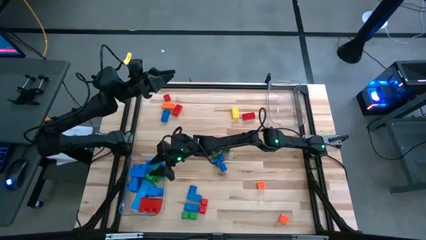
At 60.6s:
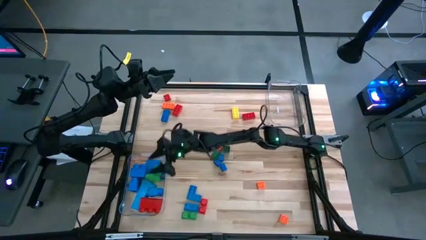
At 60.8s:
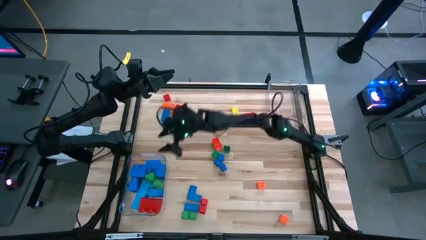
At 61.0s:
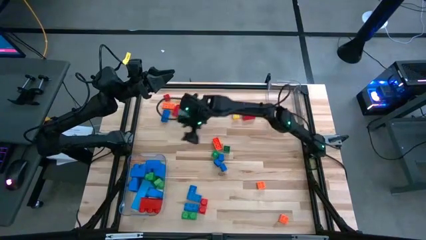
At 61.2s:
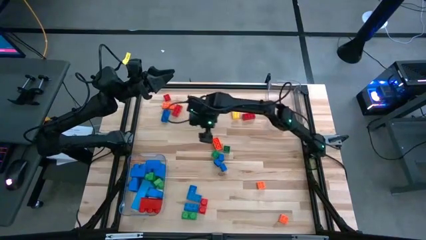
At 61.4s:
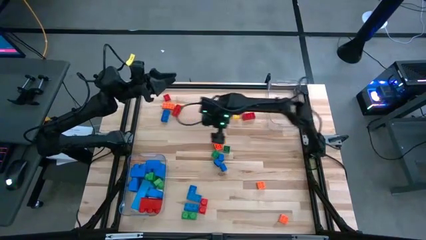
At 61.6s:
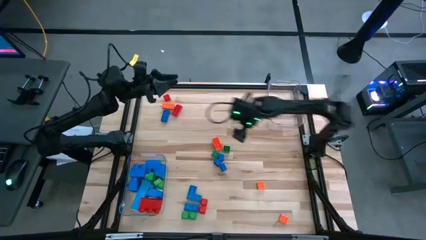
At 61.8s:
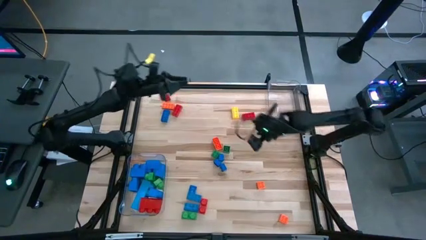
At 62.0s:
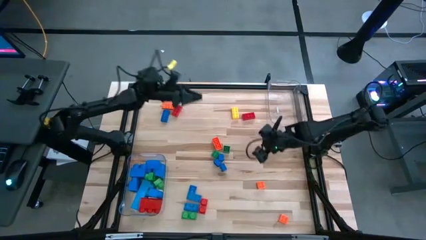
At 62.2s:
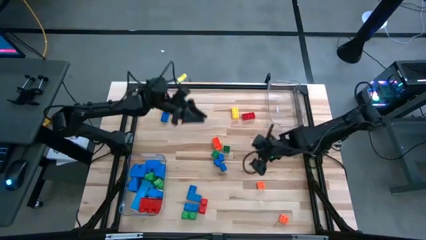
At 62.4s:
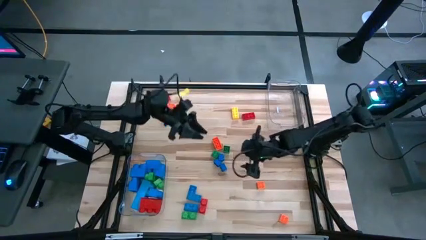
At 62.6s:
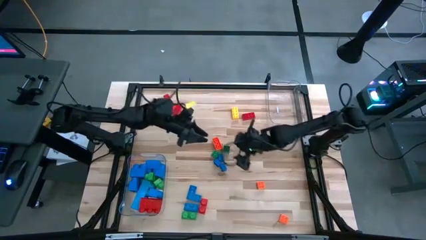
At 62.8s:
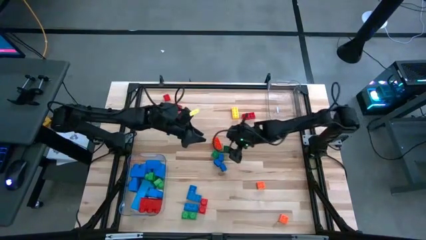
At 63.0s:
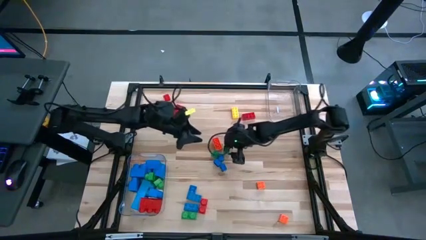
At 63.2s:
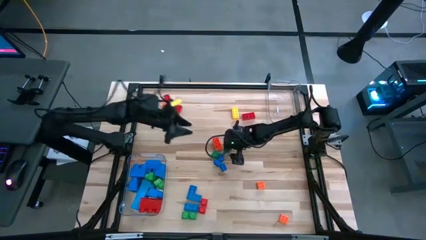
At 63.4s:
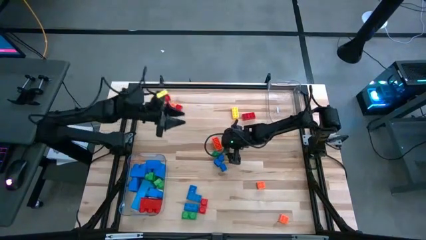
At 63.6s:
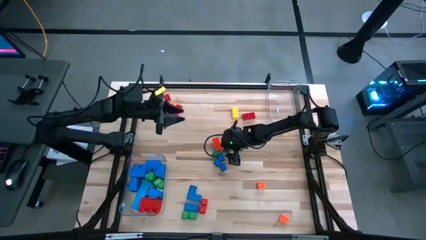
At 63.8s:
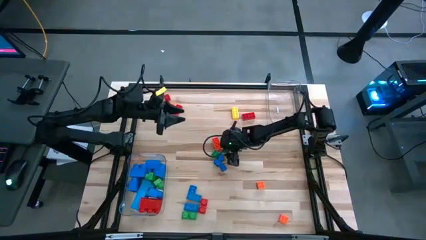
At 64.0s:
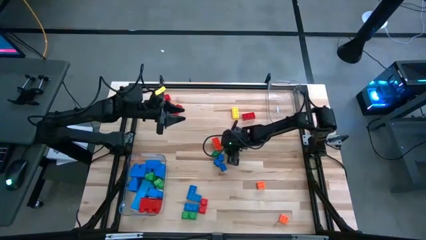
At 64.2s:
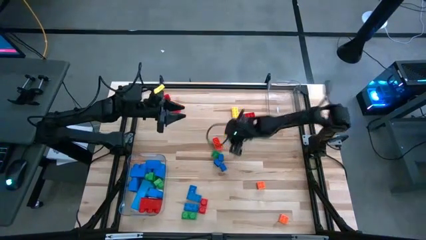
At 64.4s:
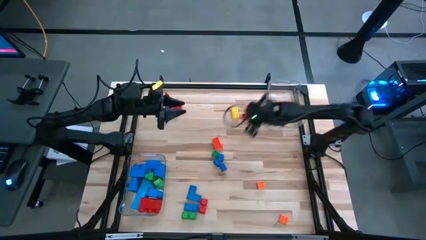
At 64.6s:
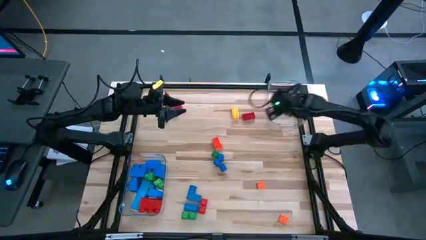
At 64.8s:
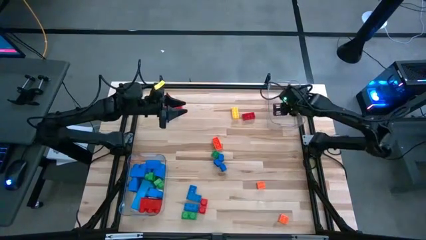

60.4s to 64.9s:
Task: Sort blocks by size
Put the small green game piece into the top transparent bin

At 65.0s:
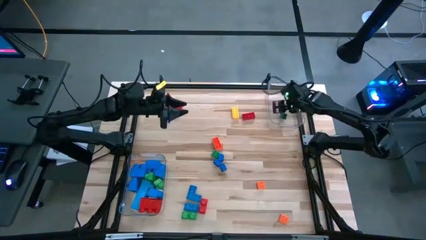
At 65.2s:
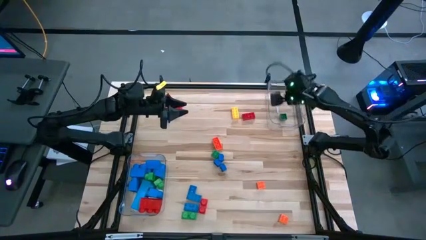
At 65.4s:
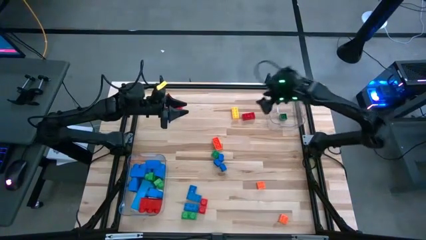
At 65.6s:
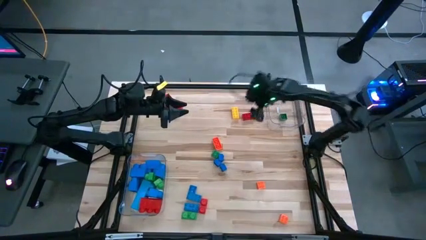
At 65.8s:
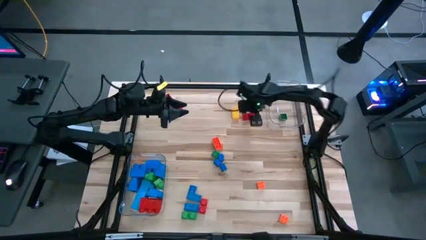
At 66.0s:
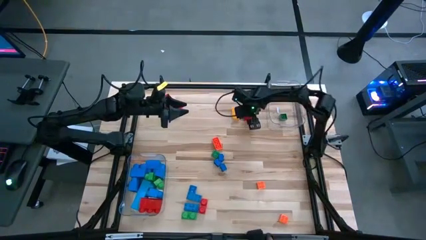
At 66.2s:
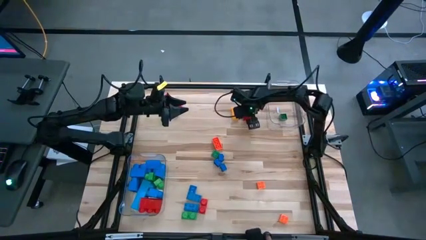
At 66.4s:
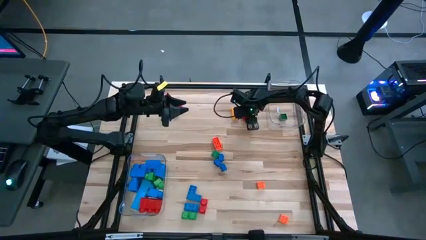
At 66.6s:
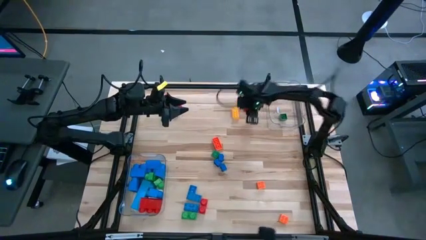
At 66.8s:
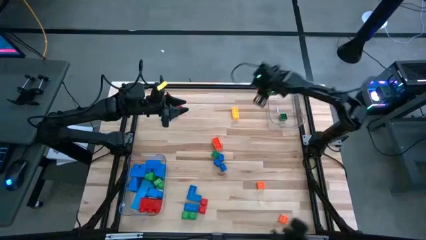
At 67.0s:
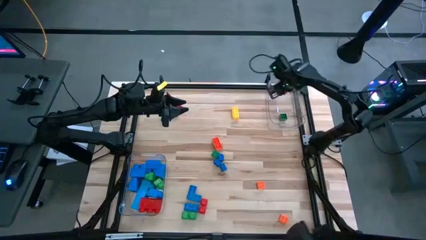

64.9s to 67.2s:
Put the small red game piece into the top transparent bin

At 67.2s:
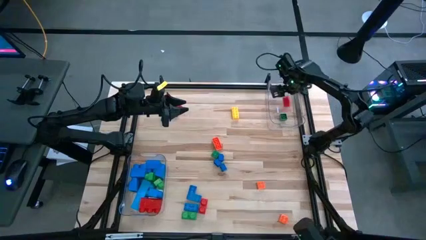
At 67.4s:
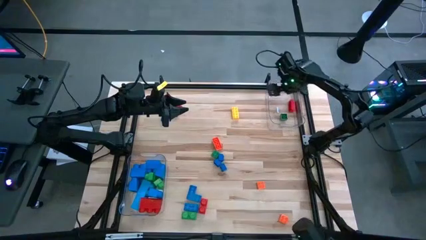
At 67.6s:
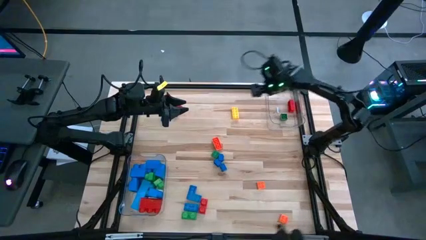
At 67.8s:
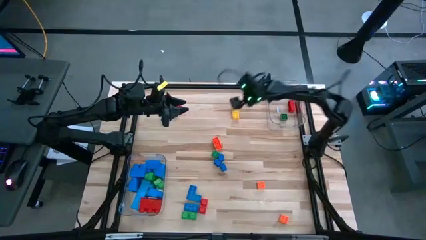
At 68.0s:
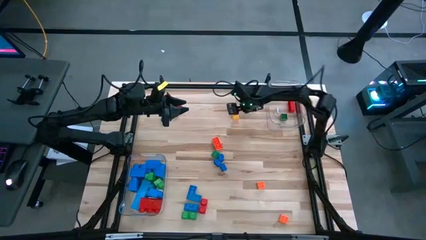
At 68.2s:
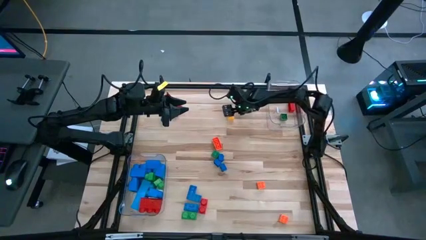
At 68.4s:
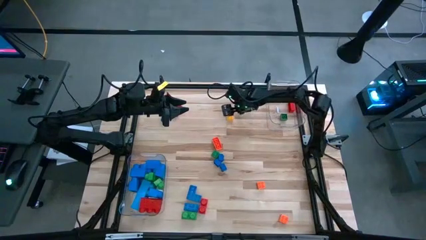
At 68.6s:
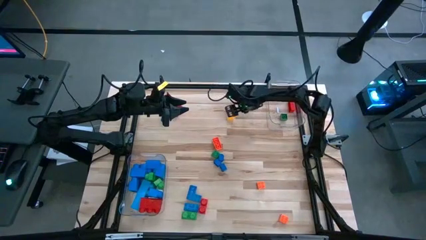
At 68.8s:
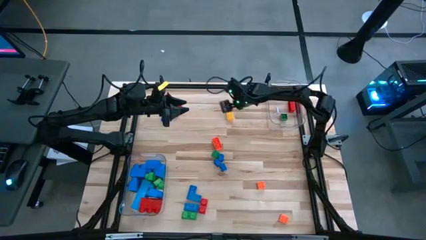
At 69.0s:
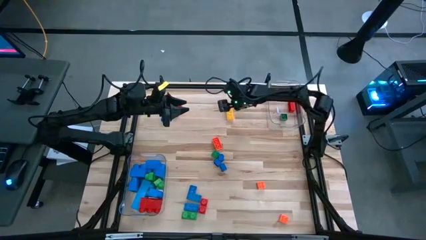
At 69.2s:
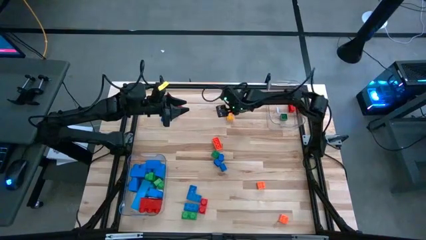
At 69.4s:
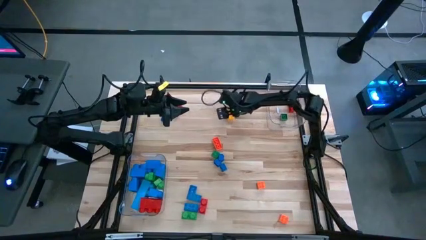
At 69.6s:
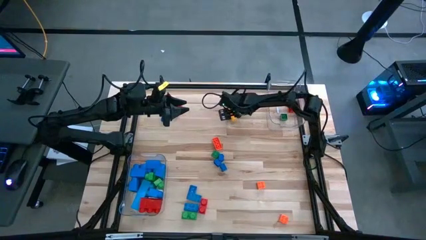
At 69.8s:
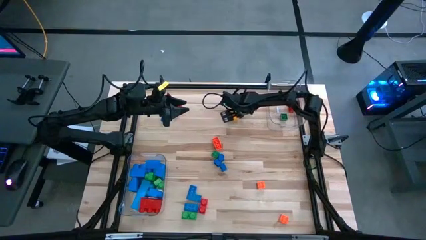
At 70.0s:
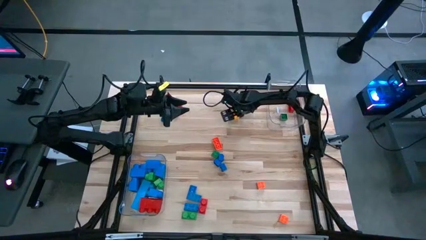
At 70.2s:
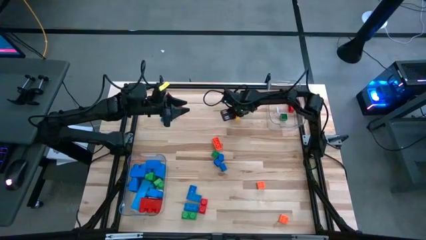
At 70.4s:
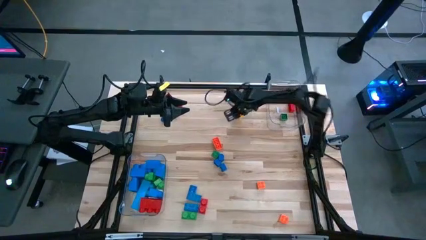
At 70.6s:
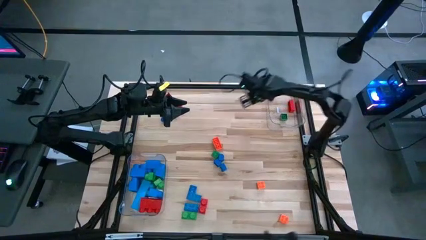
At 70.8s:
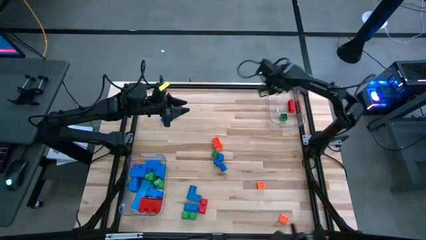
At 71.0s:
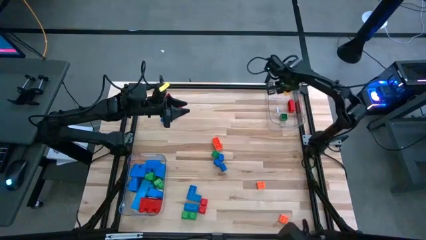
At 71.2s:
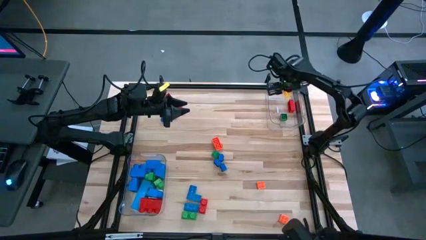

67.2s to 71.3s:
Put the small yellow game piece into the top transparent bin

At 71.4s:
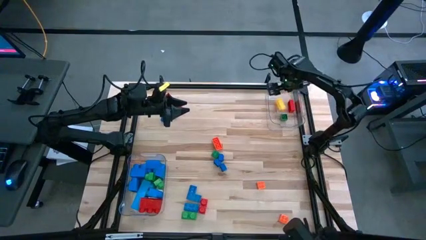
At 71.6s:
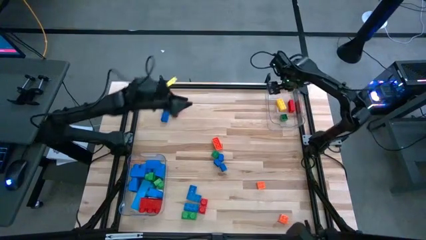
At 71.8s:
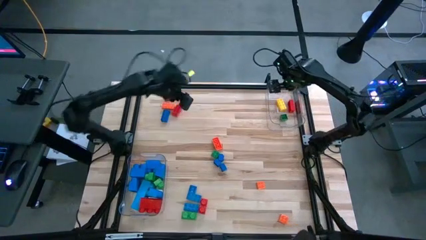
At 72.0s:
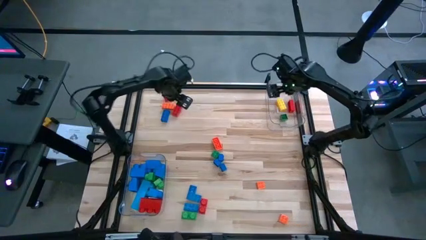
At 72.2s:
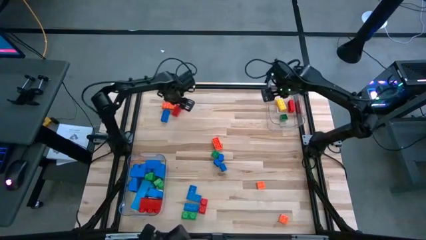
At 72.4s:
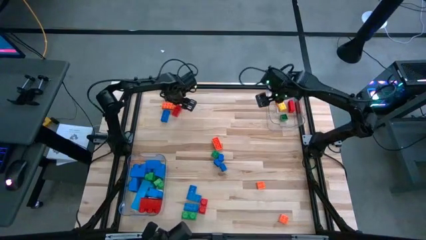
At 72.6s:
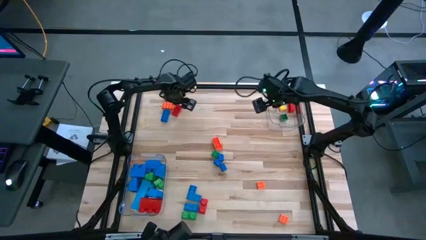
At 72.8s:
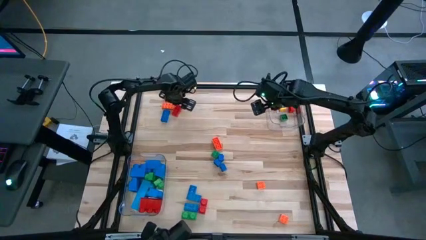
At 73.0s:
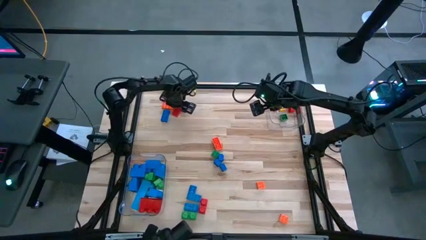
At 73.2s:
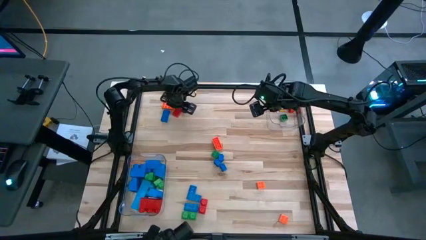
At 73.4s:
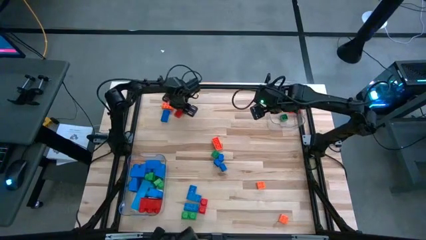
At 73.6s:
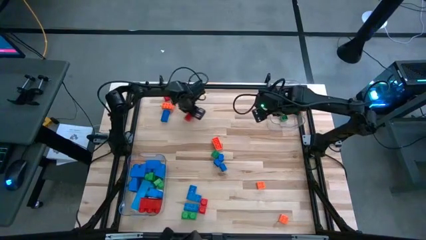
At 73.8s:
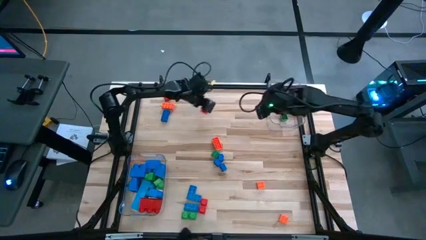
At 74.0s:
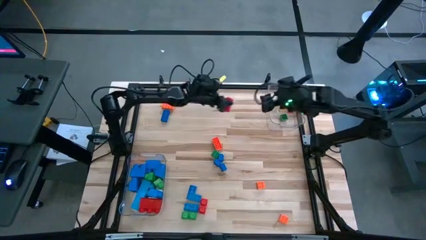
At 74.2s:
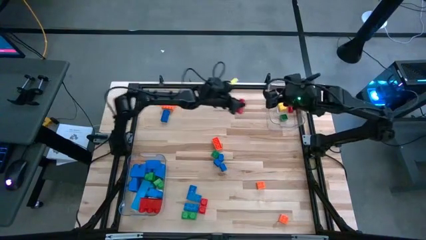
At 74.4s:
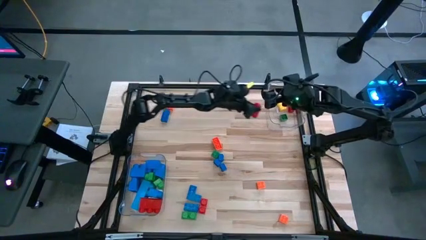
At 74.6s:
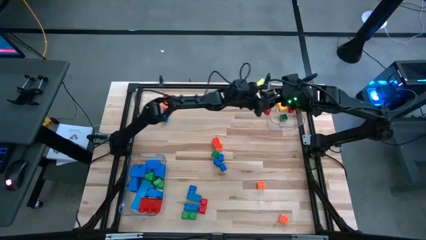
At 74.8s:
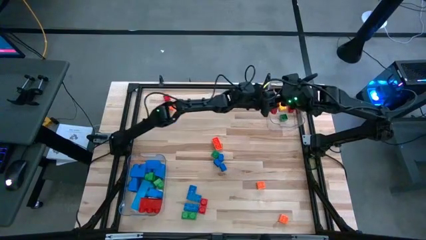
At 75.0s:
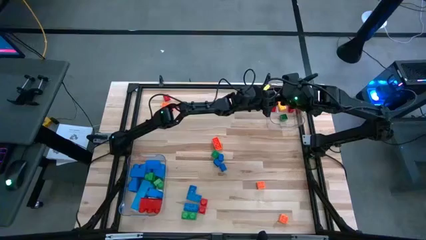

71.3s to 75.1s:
Put the small red game piece into the top transparent bin

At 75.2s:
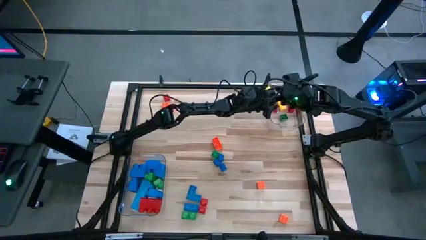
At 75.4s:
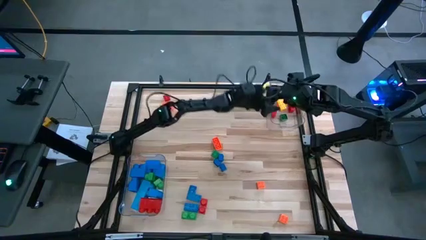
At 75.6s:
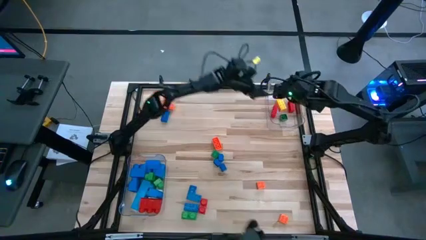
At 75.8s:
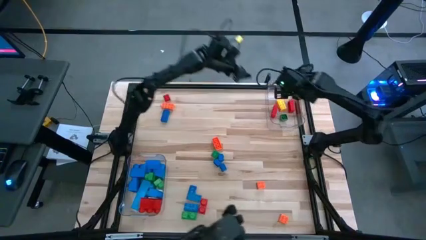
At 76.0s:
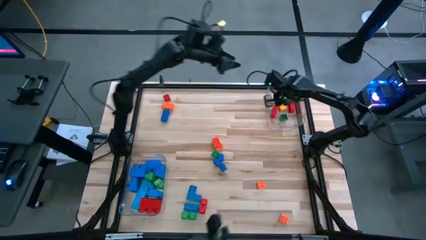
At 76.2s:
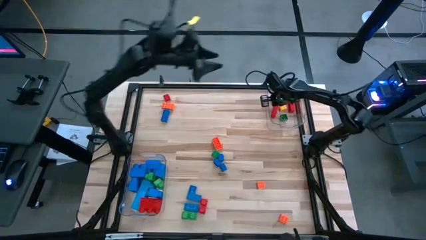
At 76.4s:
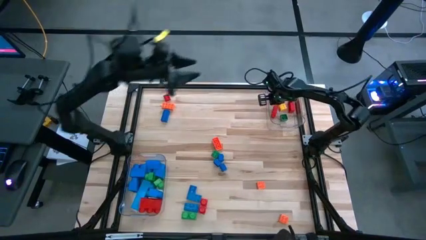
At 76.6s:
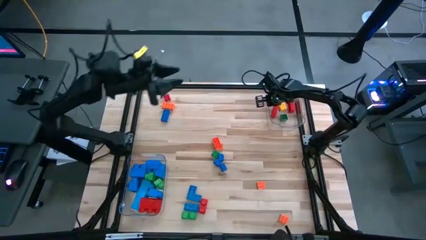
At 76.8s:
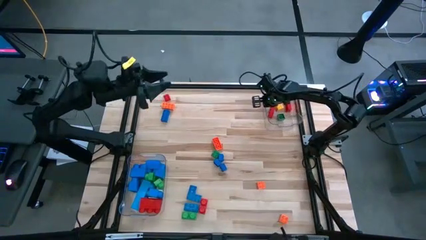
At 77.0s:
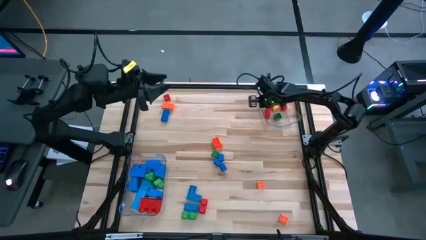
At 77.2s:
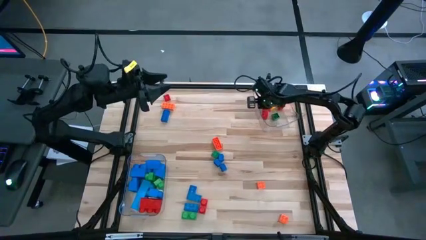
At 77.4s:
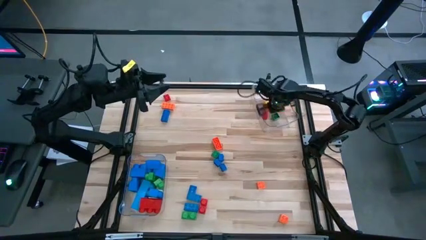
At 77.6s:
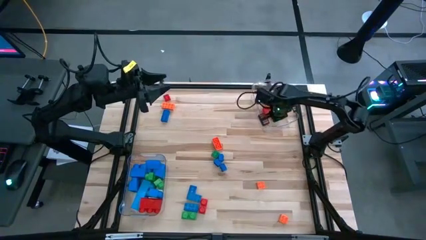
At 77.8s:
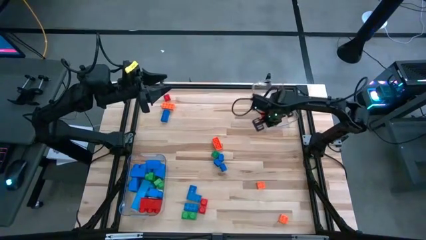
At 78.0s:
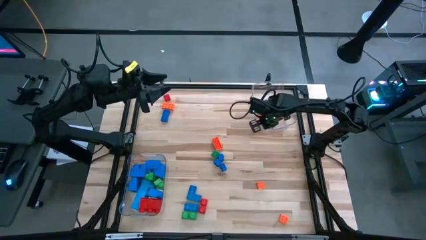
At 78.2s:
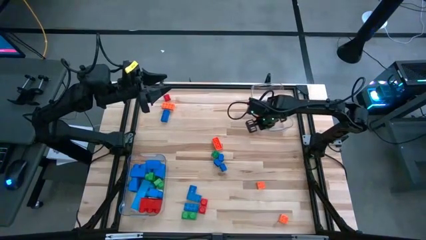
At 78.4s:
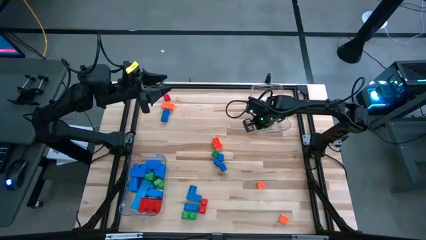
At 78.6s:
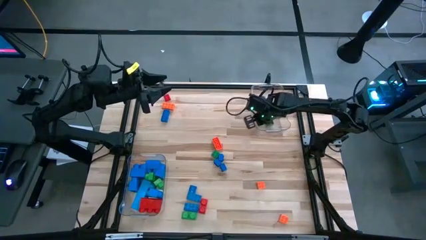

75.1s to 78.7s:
Adjust the top transparent bin
